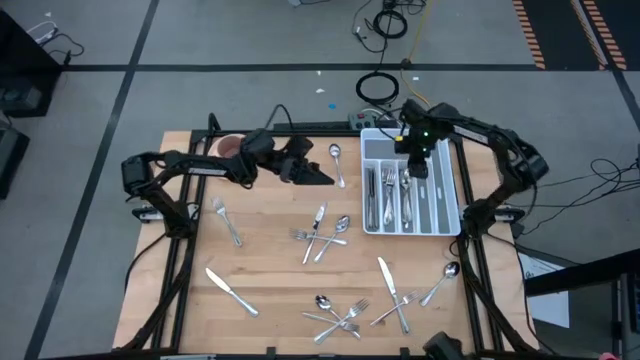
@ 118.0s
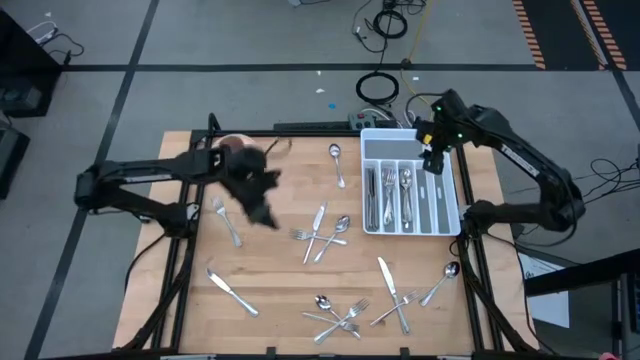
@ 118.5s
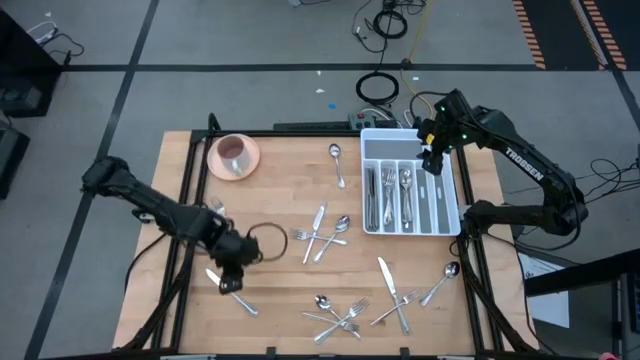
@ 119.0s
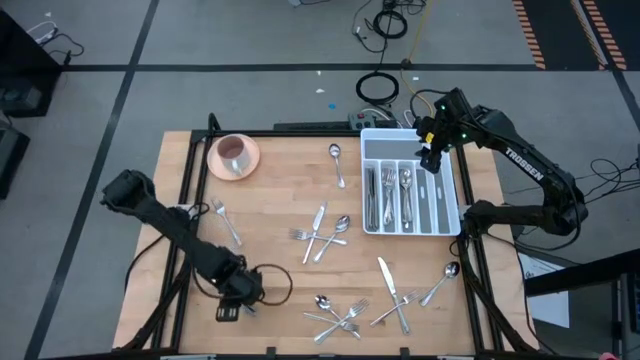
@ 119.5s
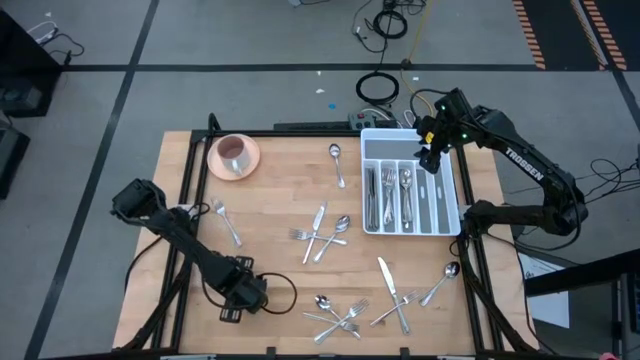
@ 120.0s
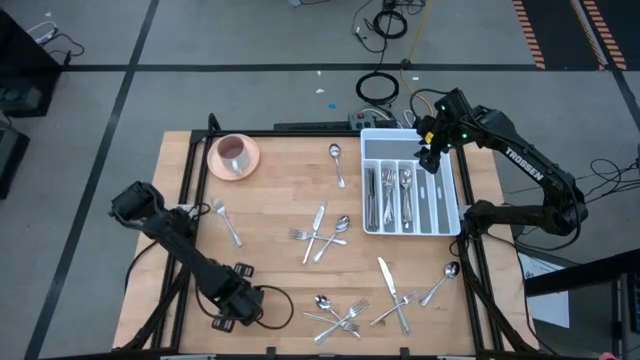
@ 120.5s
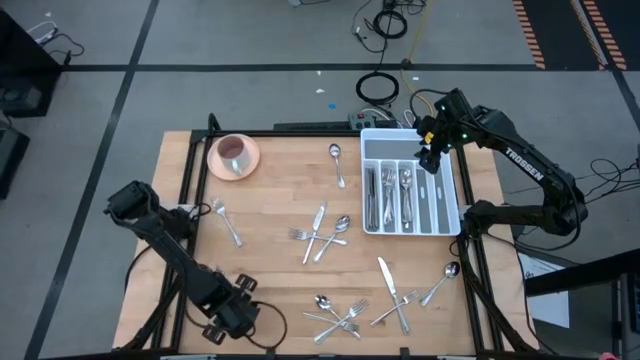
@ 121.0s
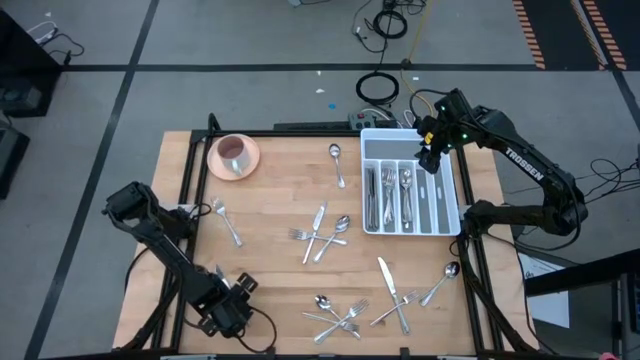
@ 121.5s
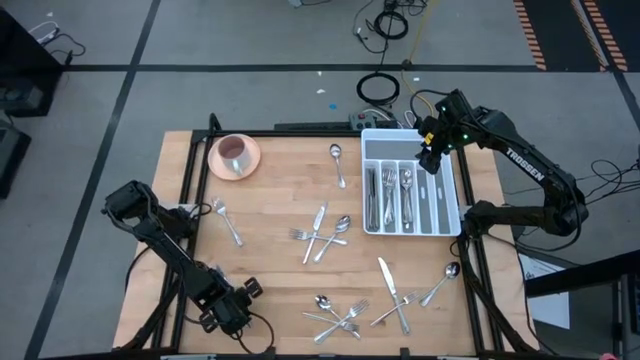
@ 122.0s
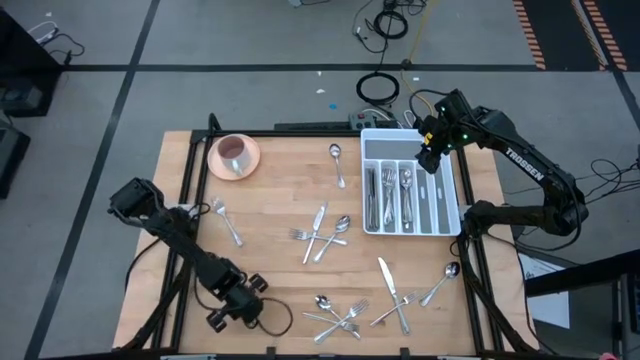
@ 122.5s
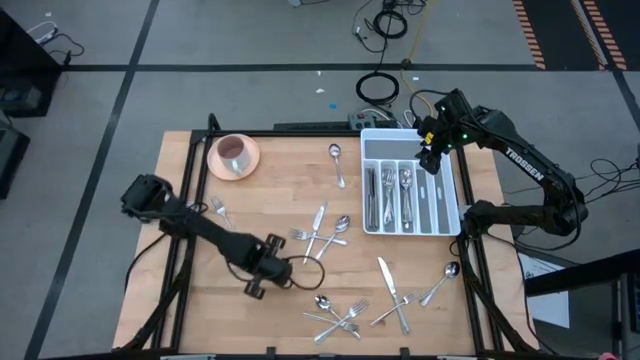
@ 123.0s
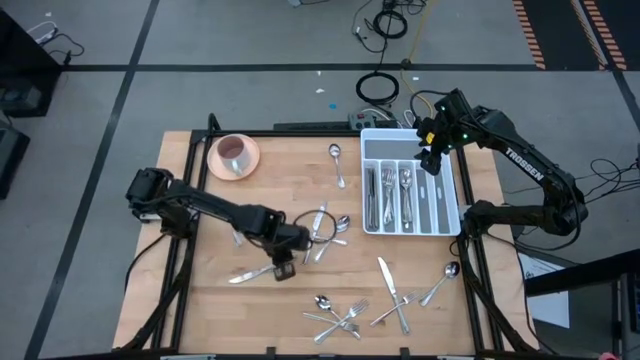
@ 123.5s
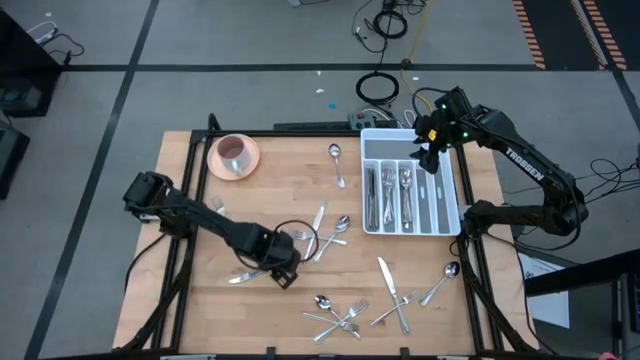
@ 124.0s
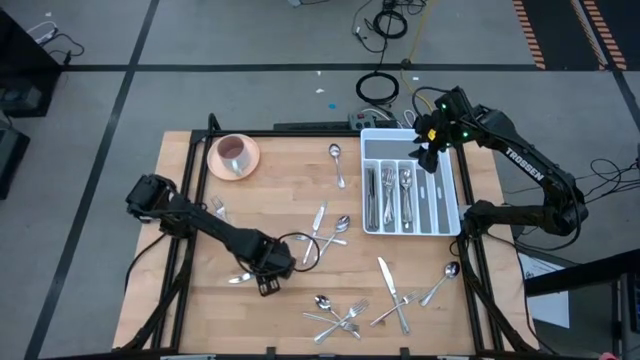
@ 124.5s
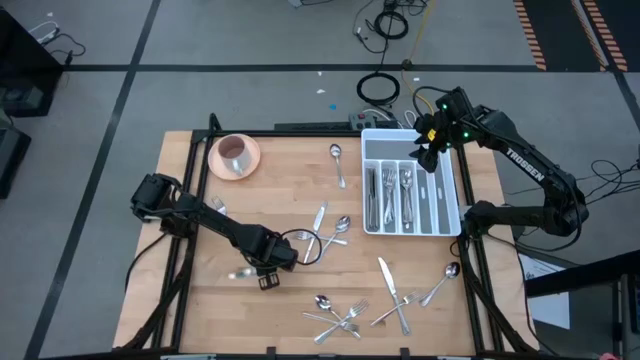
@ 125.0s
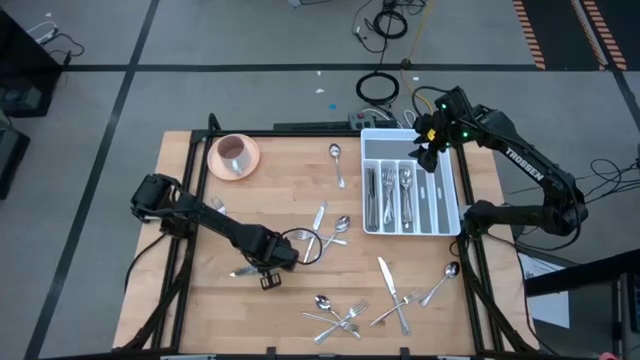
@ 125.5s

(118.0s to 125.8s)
Task: Sort silverware
Put the silver knife into the white cutlery tray

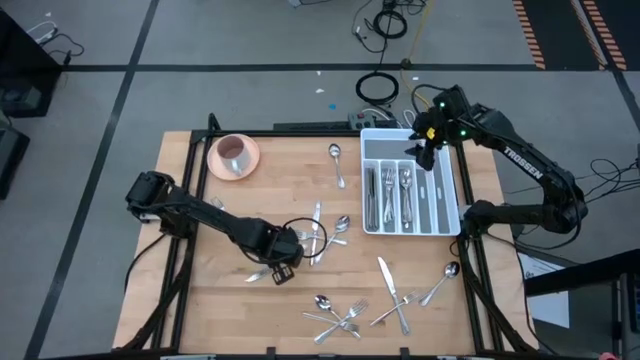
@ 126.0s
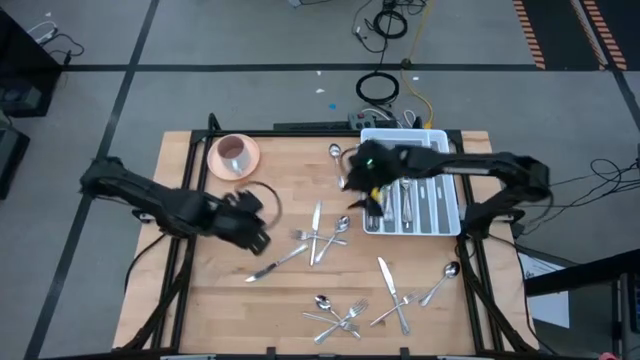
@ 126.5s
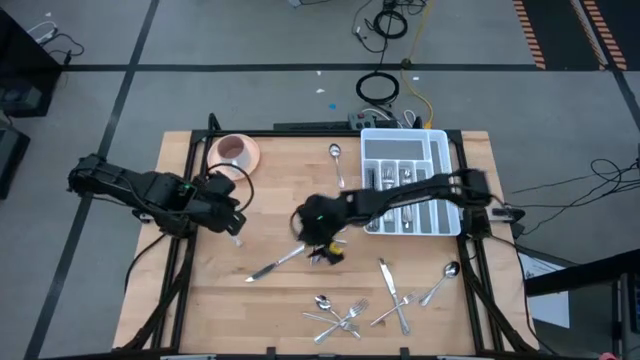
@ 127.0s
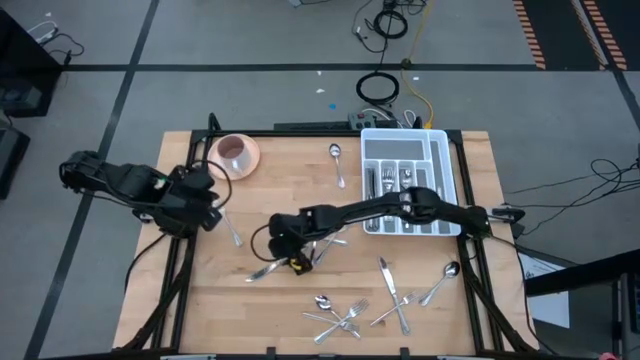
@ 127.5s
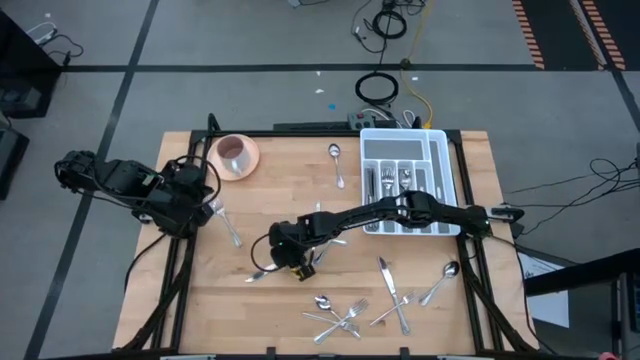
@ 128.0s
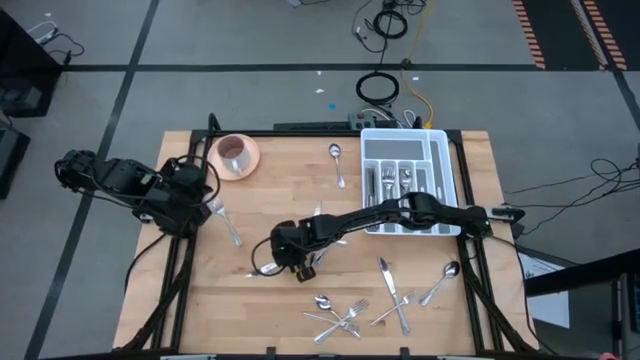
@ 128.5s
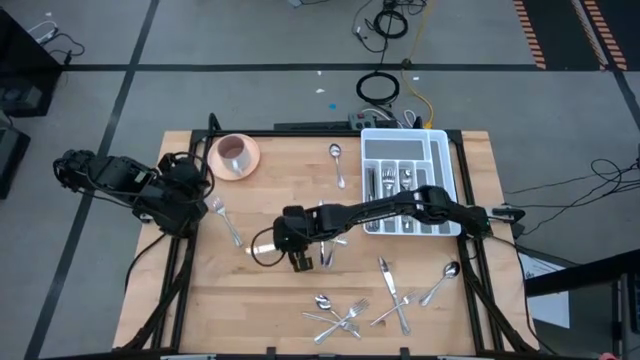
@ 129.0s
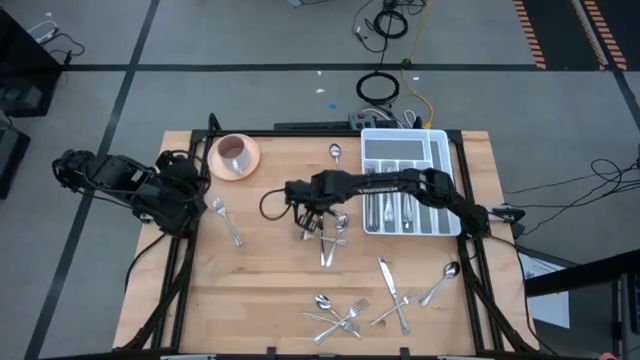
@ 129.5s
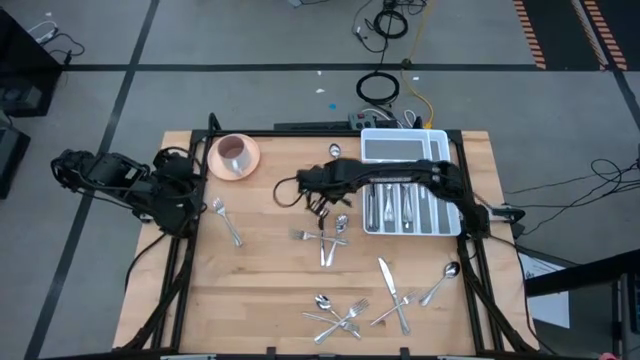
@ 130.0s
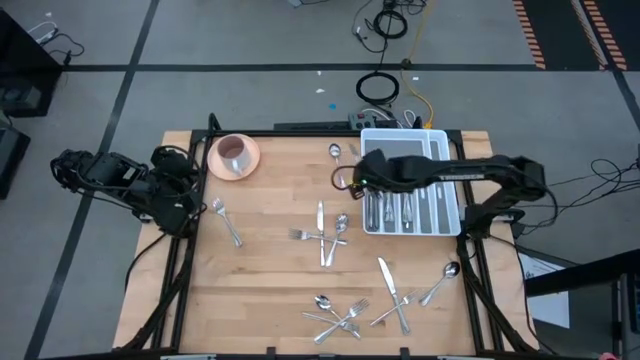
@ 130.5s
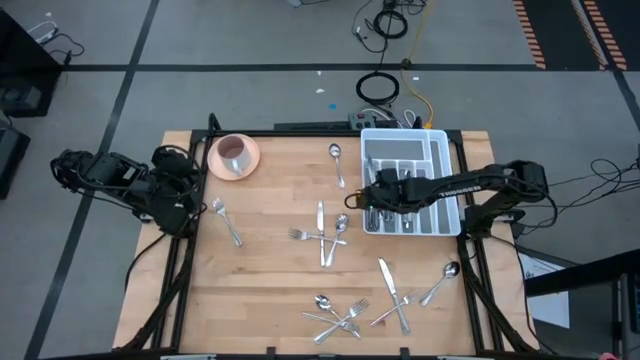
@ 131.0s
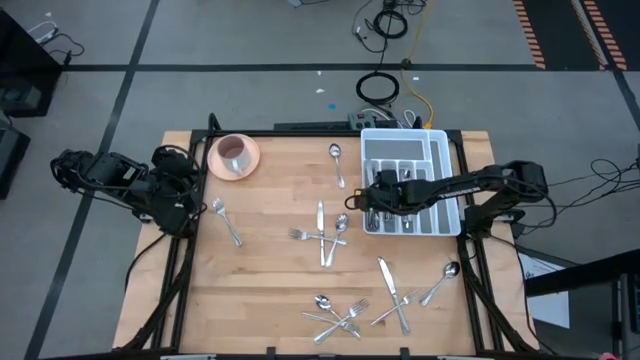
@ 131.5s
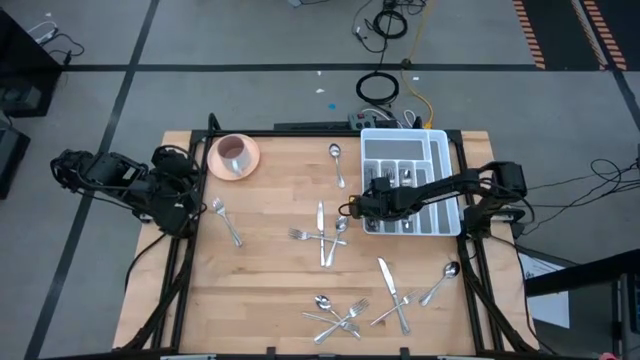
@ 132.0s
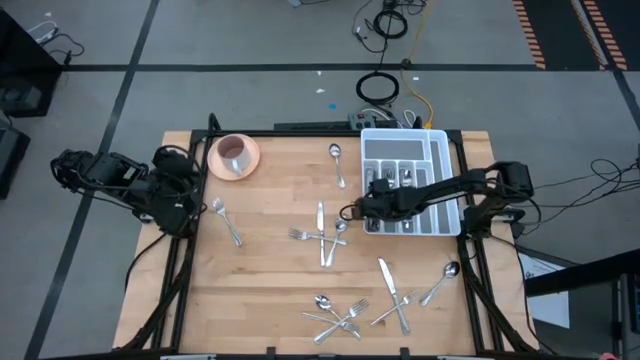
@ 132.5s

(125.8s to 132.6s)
Put the silver knife into the white cutlery tray

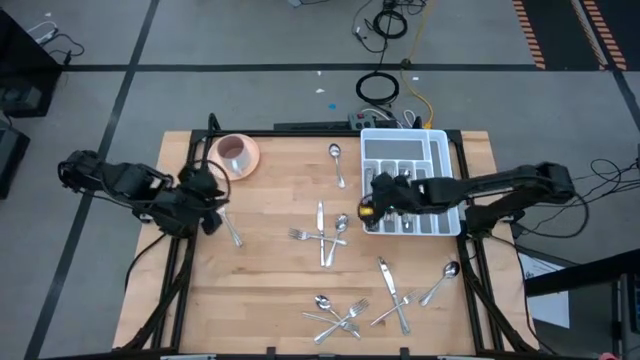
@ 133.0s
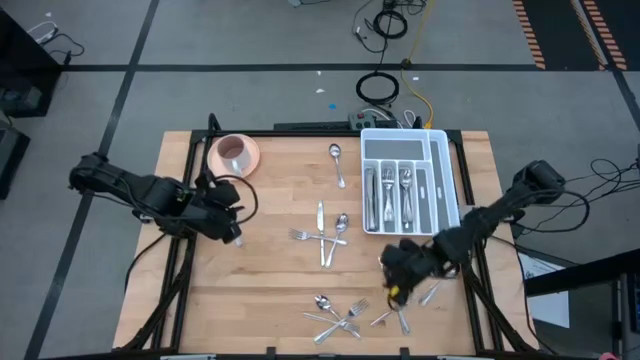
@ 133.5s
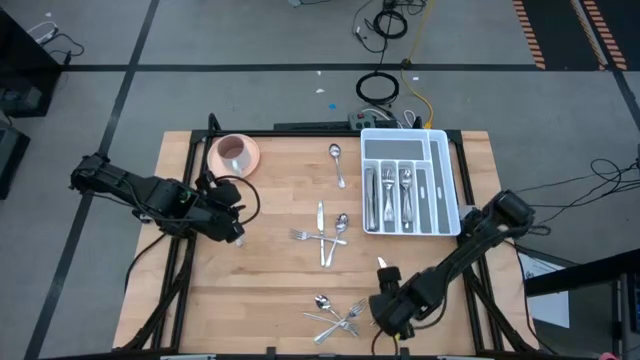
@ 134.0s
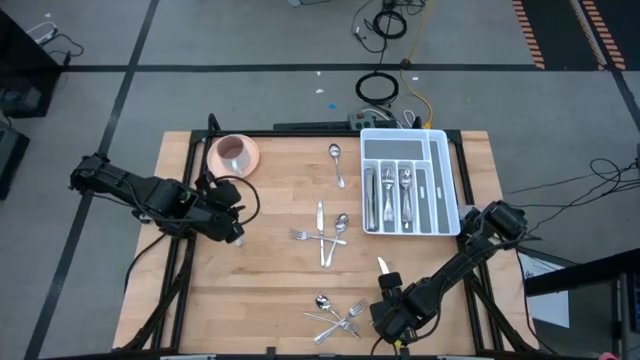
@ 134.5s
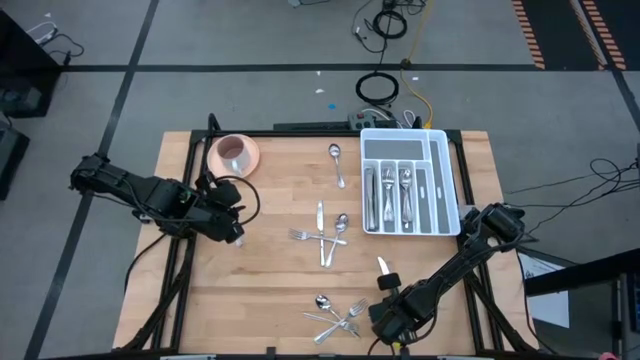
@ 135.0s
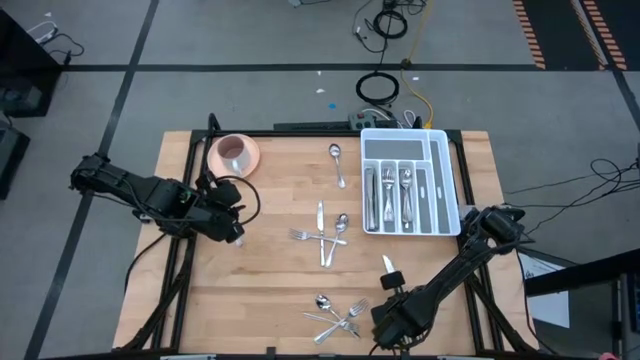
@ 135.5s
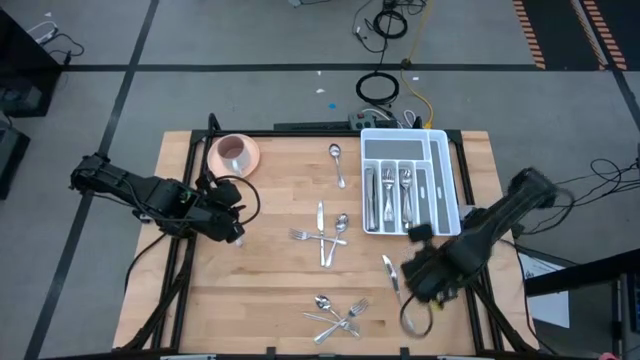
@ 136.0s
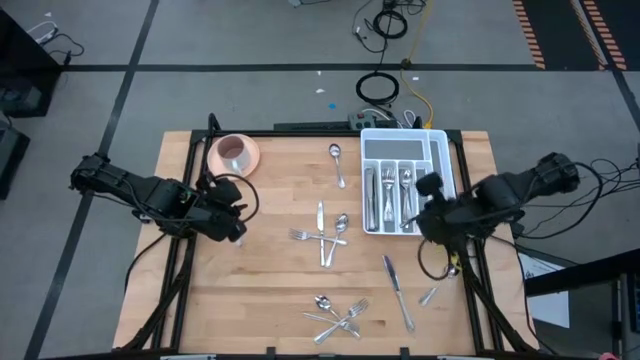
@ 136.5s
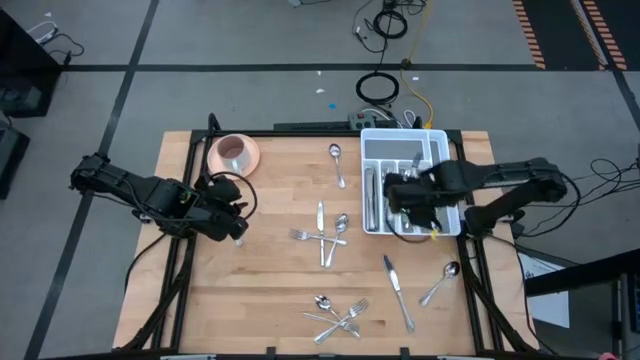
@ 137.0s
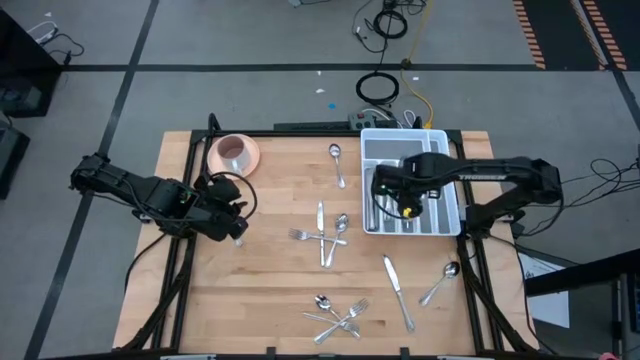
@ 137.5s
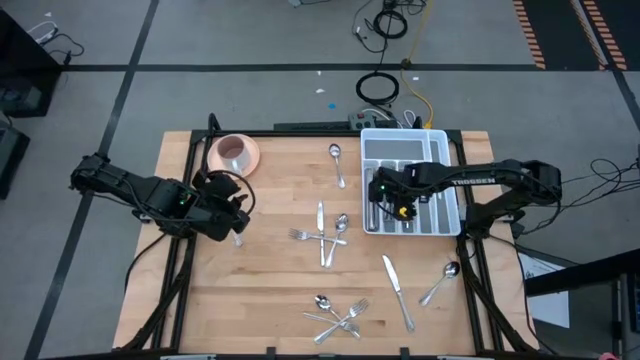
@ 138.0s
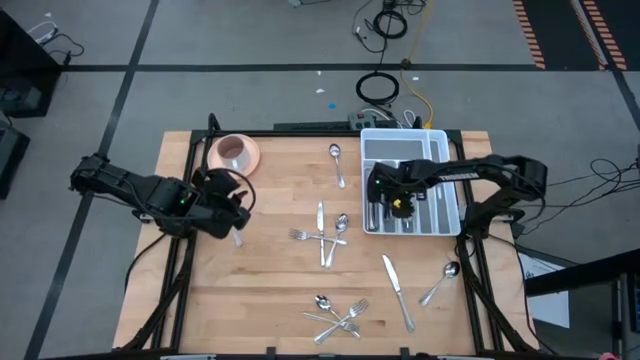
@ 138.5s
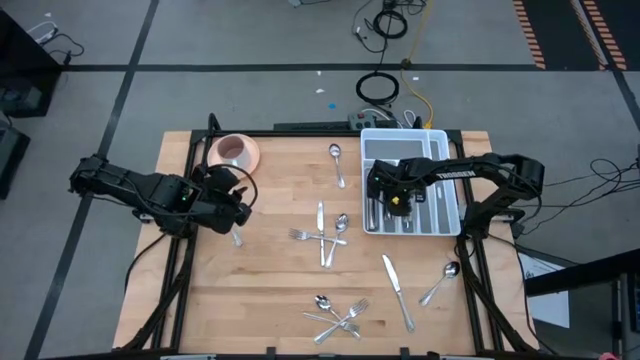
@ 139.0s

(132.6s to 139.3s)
Put the silver fork into the white cutlery tray
